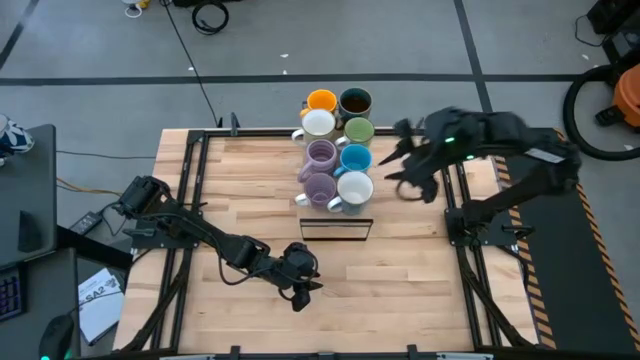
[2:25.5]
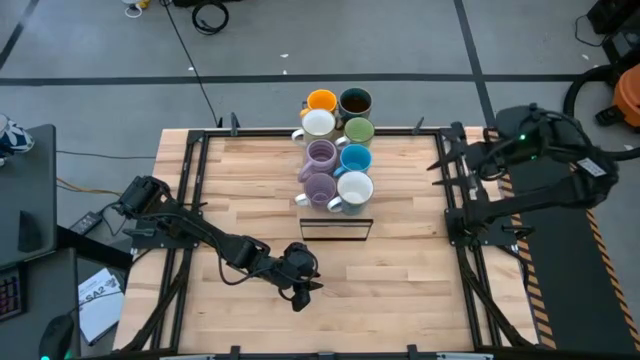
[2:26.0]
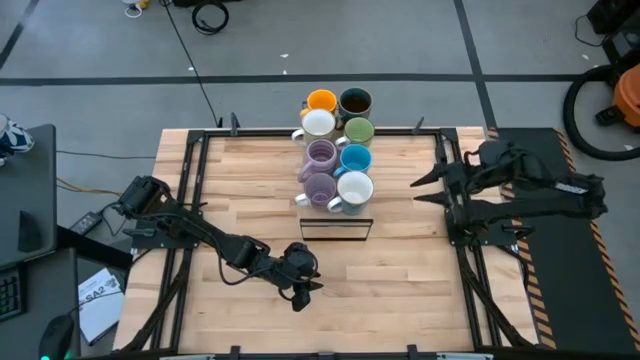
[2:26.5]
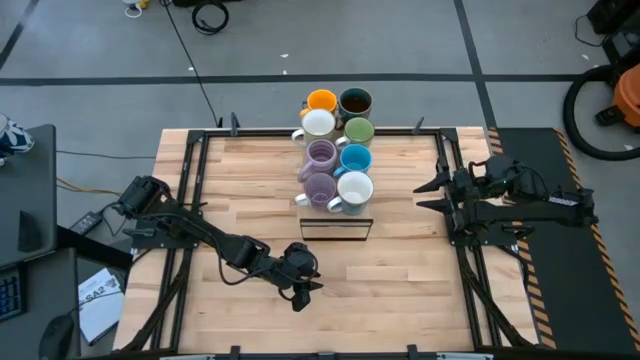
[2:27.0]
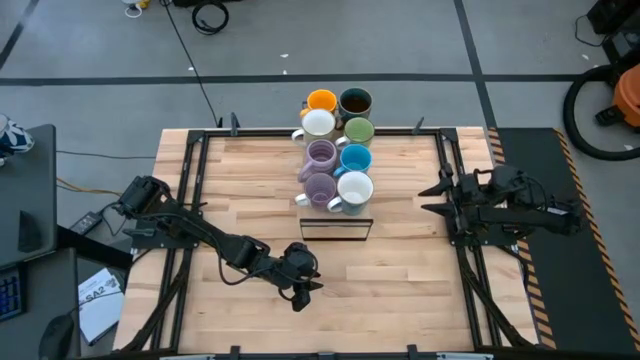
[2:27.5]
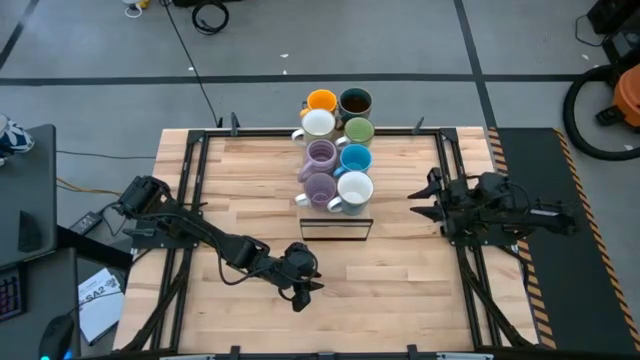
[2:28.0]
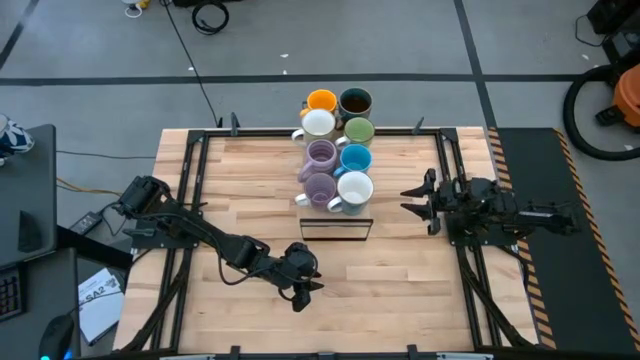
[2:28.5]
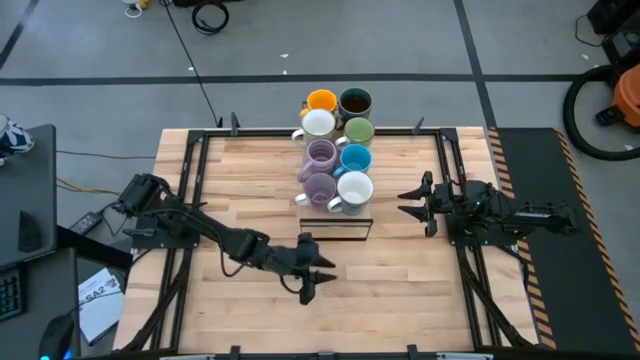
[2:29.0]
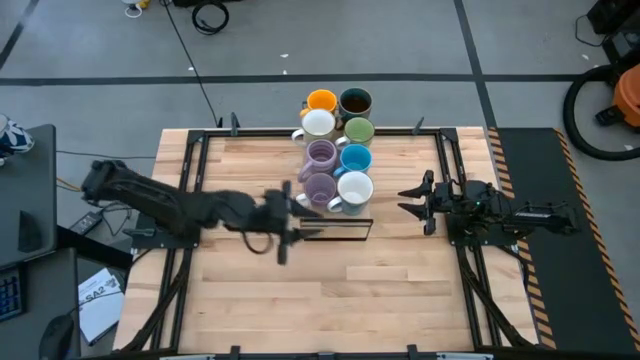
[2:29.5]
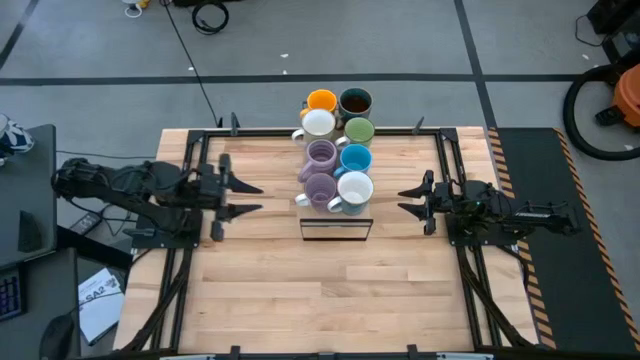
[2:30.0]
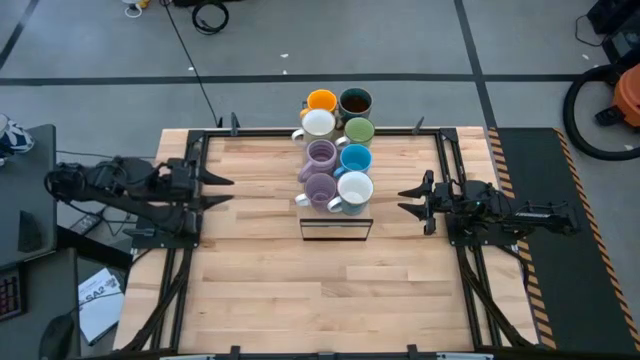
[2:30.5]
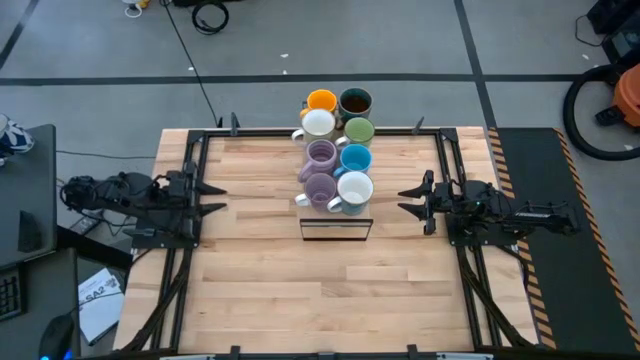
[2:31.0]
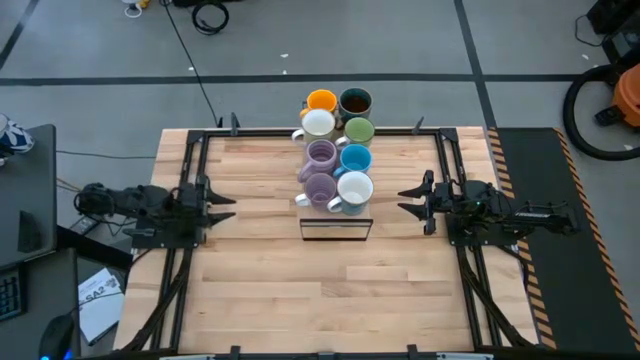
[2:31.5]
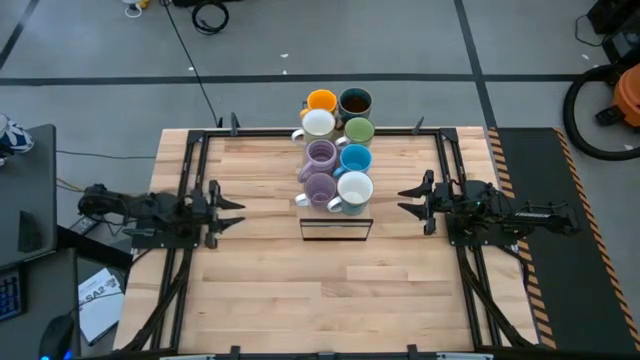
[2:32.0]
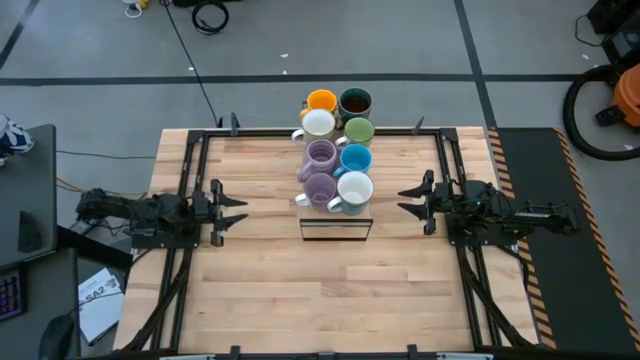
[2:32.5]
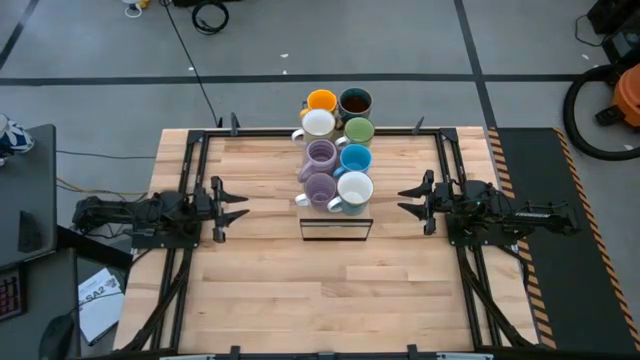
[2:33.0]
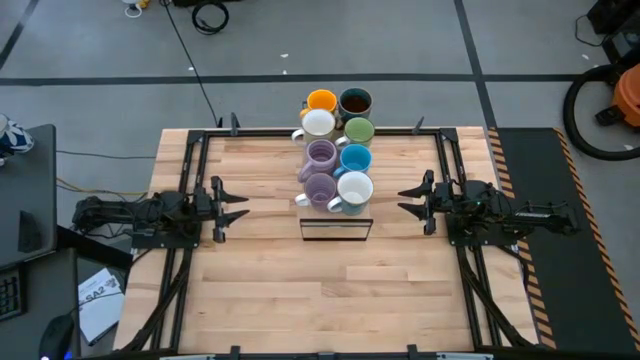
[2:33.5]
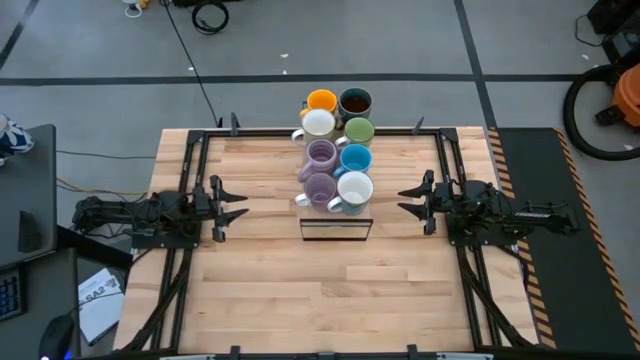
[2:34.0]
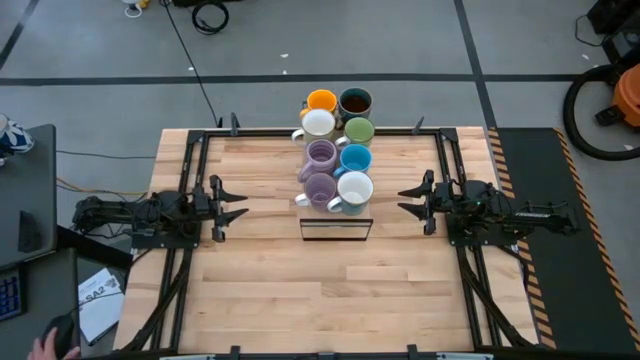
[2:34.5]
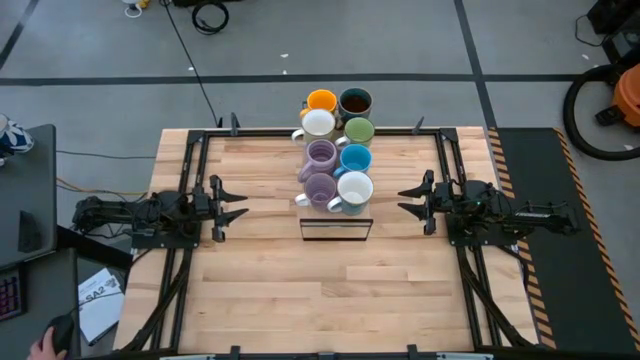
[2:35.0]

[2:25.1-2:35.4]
Task: Place coffee mugs
Return to Home Position

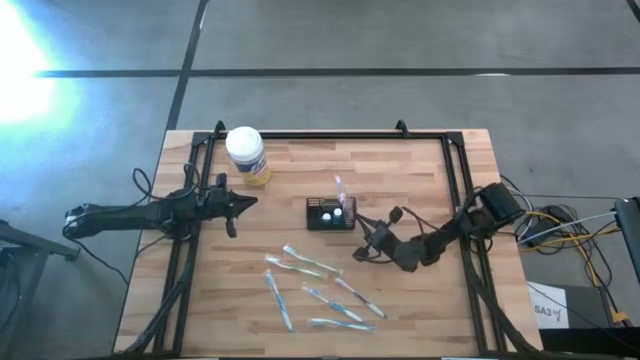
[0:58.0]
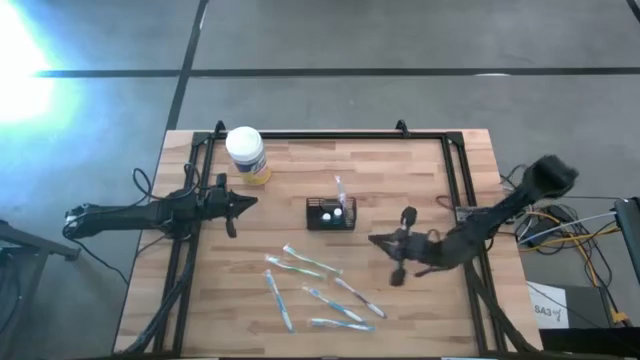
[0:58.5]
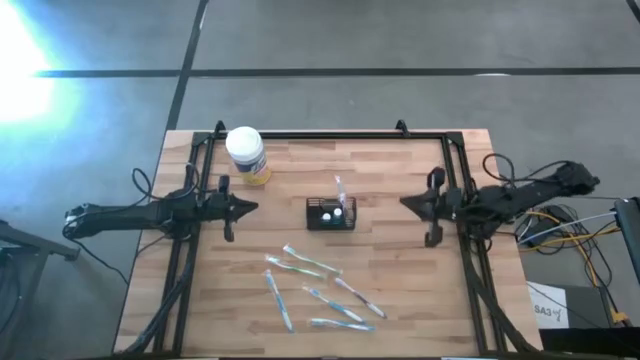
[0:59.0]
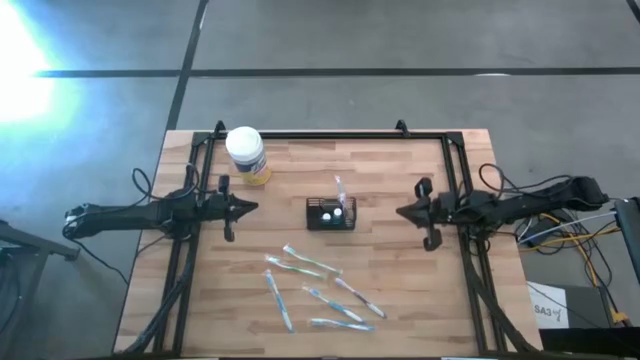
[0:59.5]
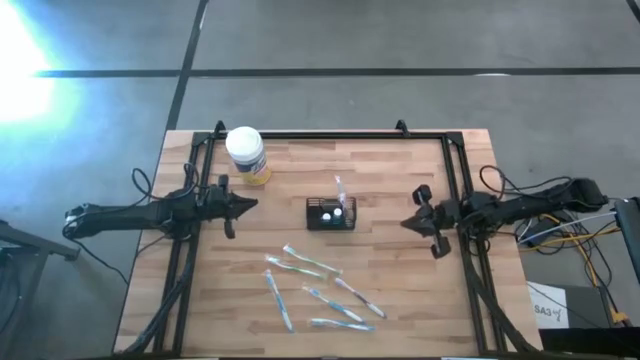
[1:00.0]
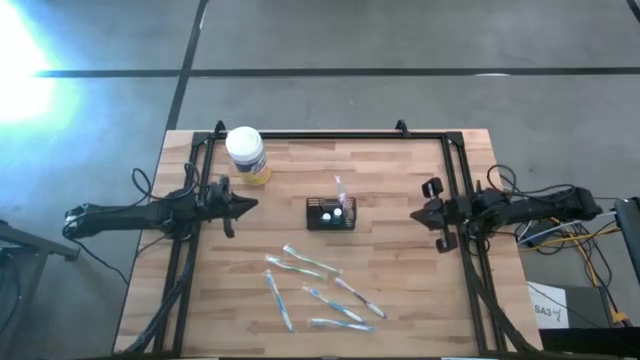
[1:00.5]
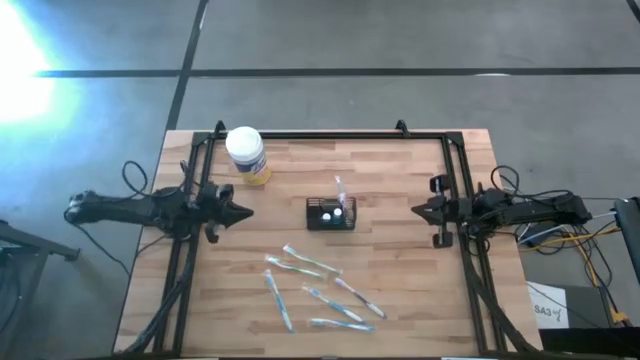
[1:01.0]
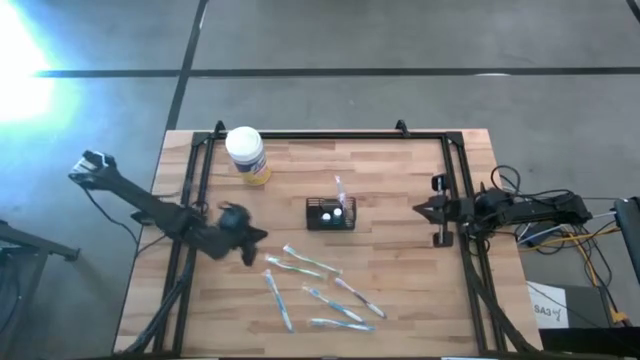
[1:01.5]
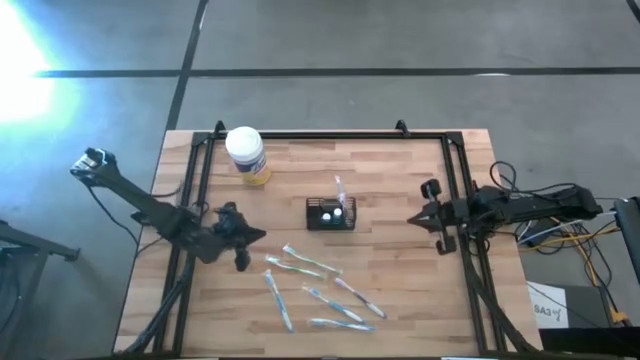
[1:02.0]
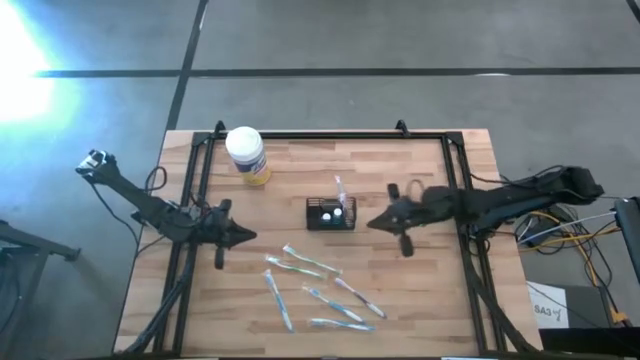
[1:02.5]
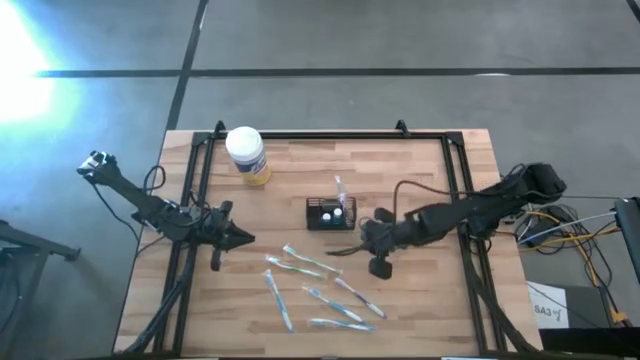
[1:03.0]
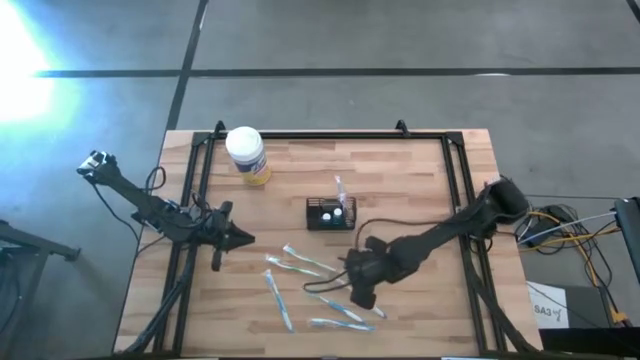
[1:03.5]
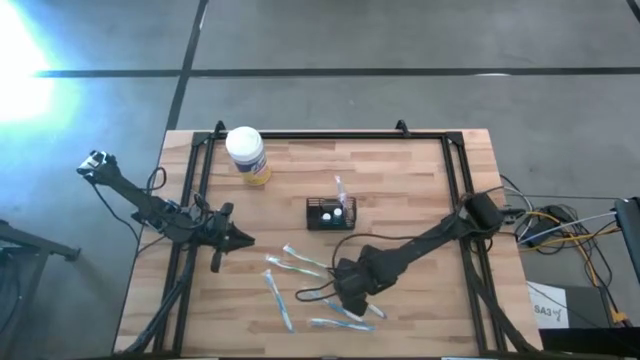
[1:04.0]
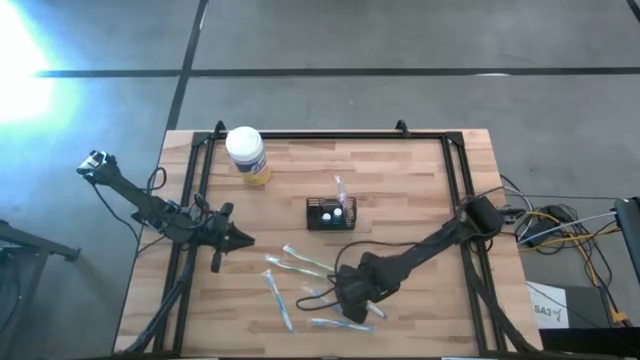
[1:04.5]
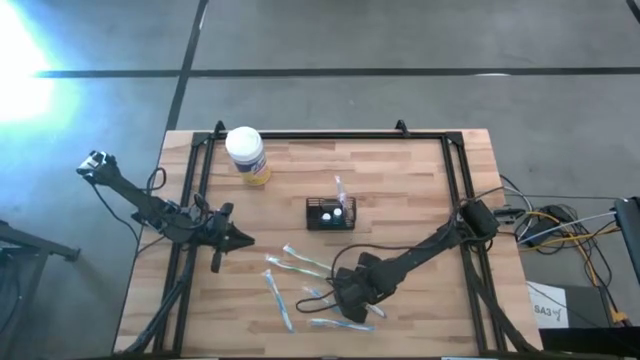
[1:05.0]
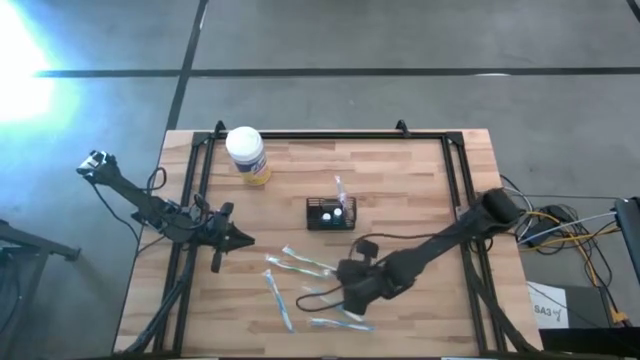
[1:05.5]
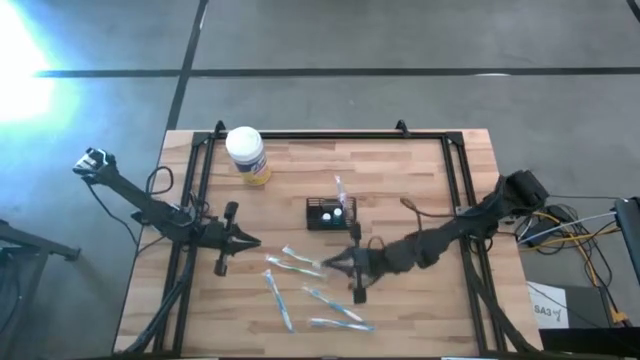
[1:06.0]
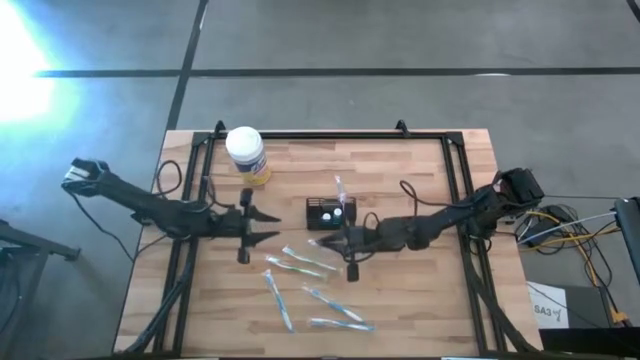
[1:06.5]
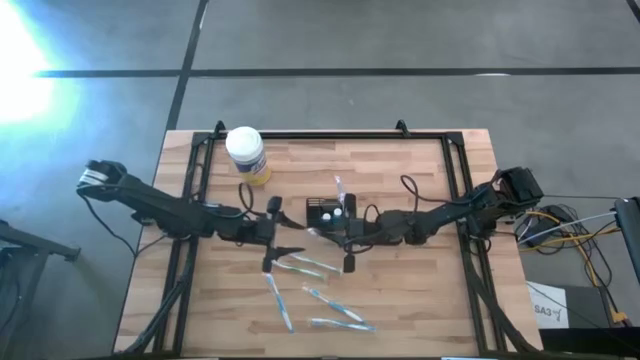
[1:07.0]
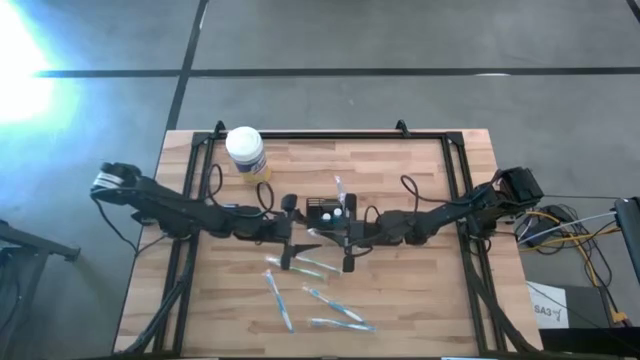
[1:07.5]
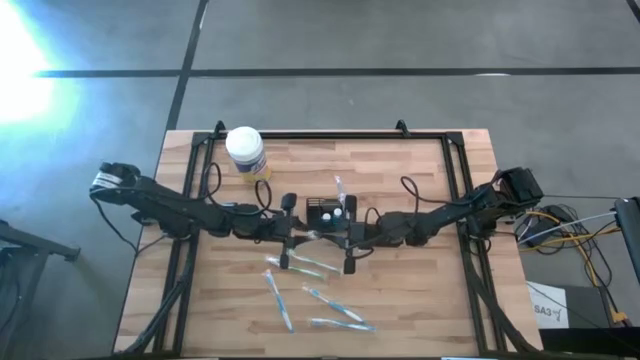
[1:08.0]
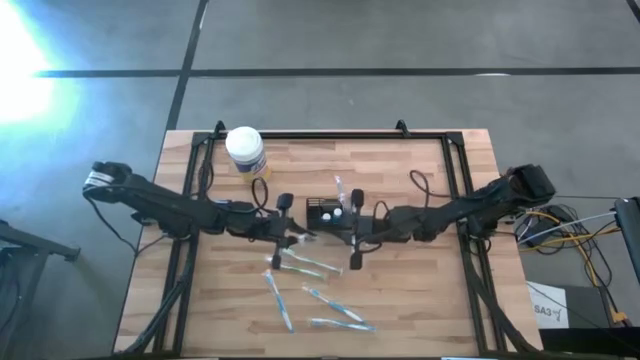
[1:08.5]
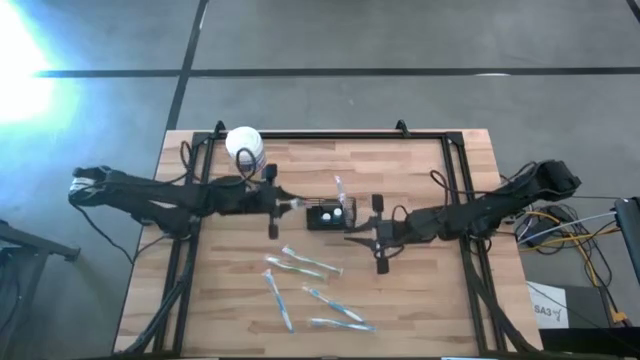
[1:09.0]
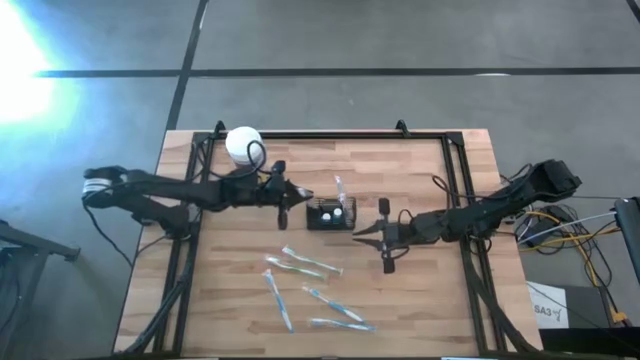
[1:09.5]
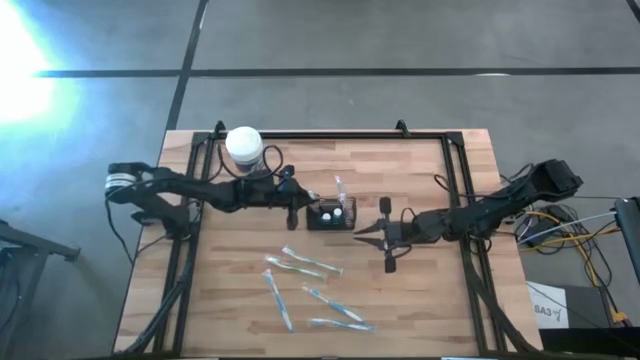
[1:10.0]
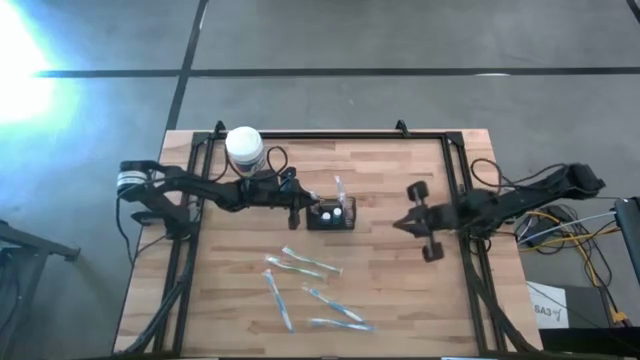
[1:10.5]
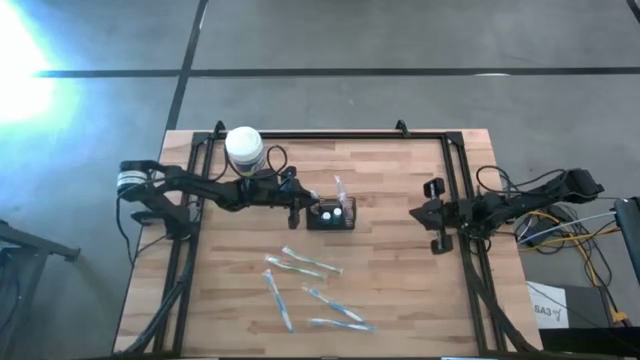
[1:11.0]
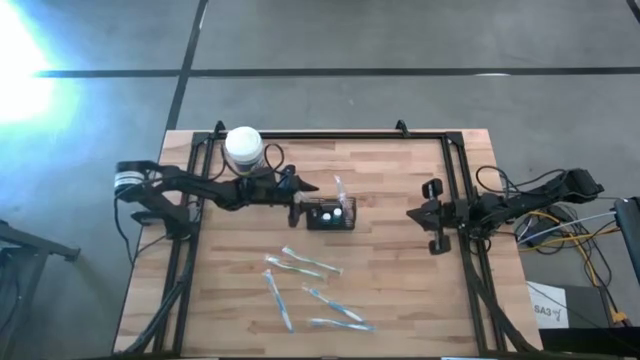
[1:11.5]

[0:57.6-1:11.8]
Task: Pick & Place toothbrushing station
Put the purple toothbrush into the wire organizer
